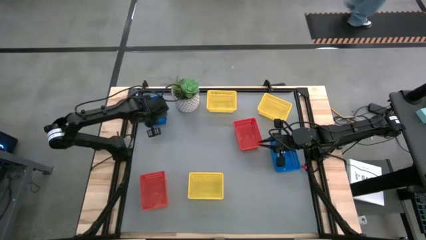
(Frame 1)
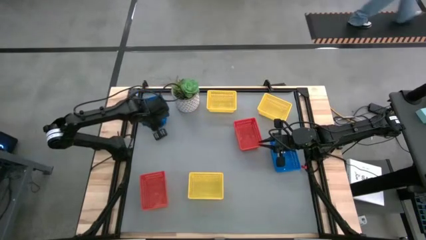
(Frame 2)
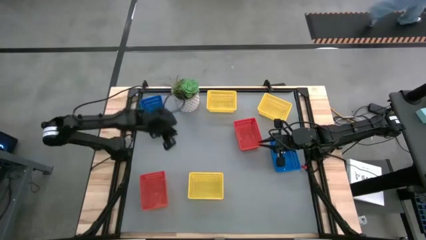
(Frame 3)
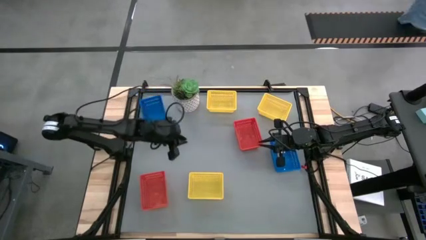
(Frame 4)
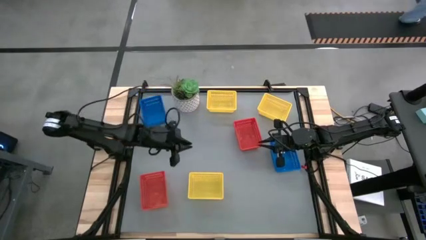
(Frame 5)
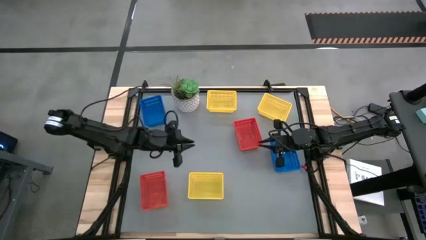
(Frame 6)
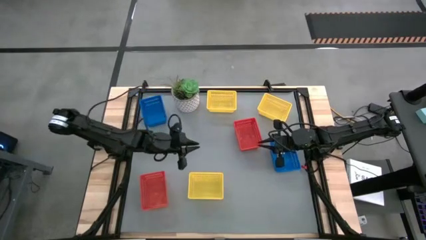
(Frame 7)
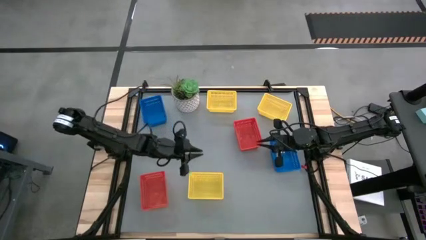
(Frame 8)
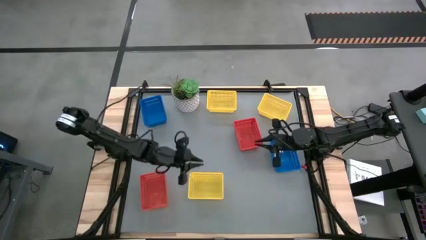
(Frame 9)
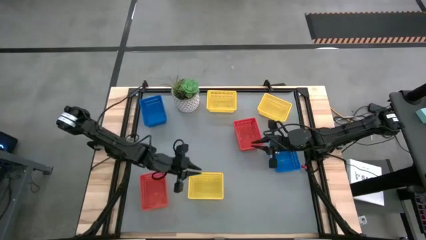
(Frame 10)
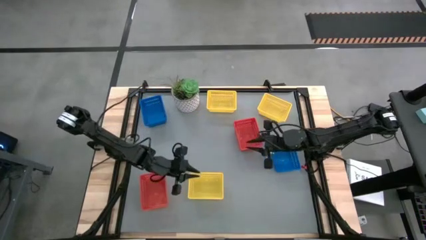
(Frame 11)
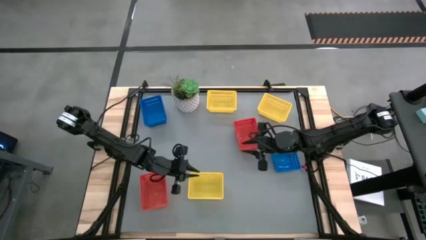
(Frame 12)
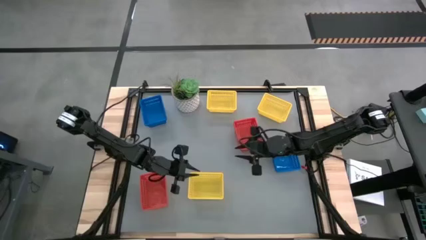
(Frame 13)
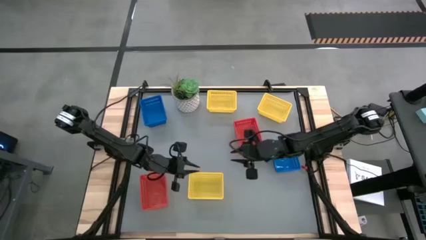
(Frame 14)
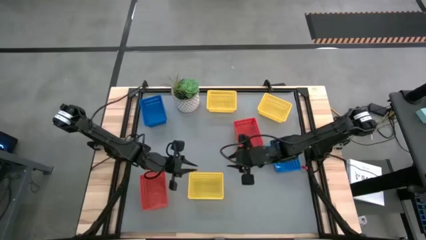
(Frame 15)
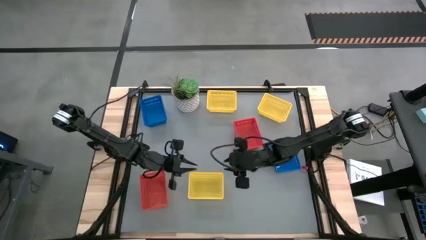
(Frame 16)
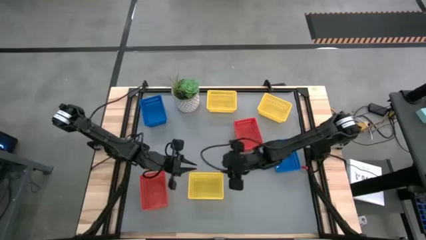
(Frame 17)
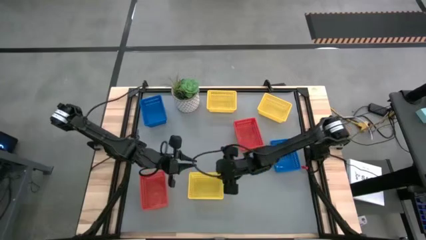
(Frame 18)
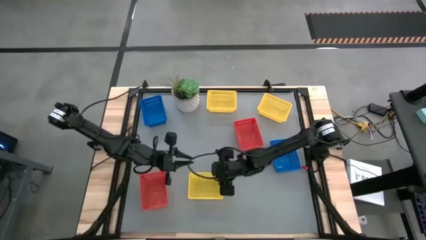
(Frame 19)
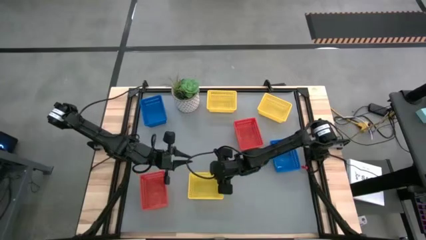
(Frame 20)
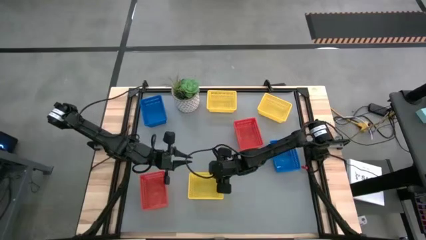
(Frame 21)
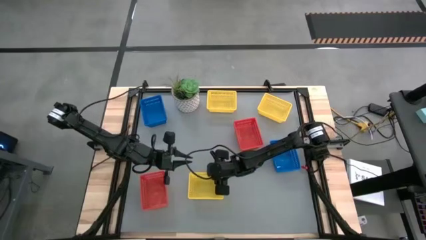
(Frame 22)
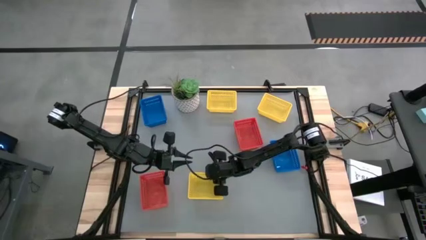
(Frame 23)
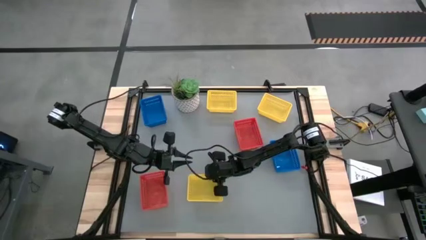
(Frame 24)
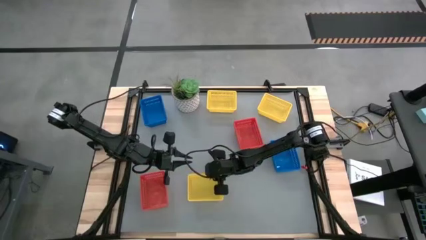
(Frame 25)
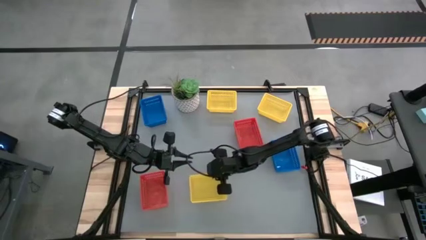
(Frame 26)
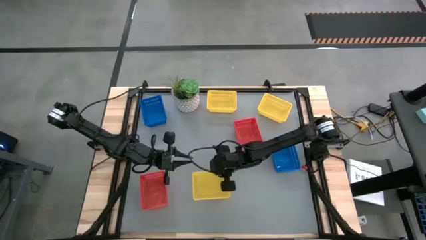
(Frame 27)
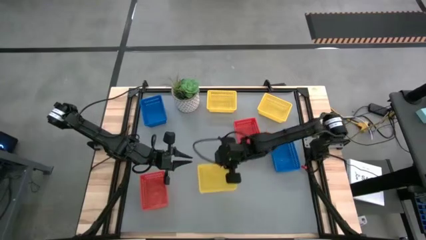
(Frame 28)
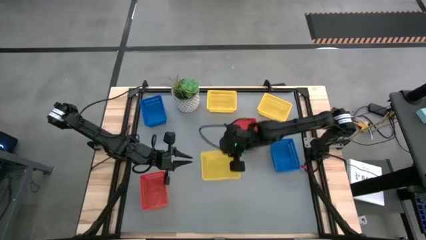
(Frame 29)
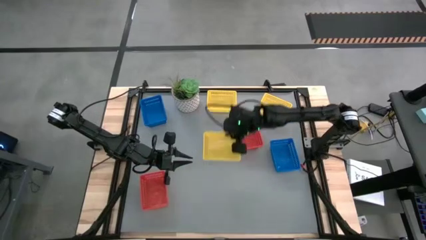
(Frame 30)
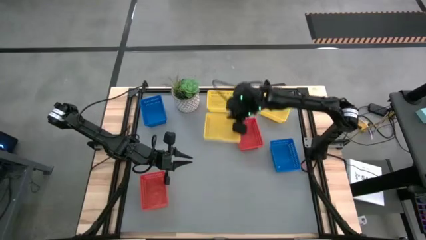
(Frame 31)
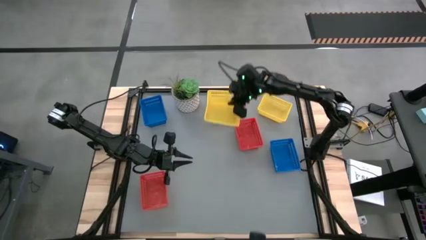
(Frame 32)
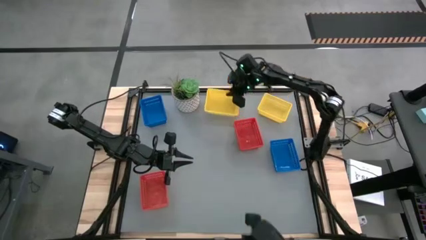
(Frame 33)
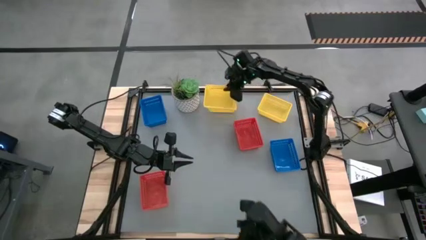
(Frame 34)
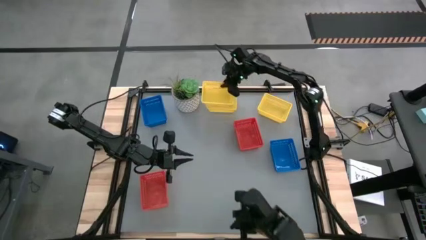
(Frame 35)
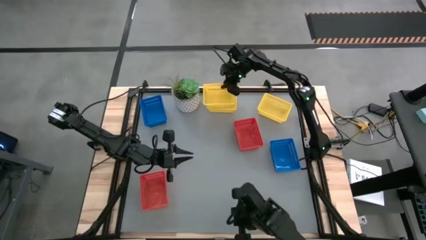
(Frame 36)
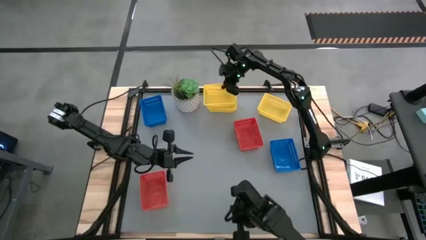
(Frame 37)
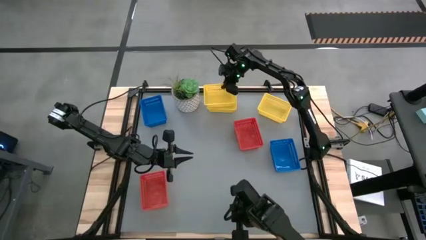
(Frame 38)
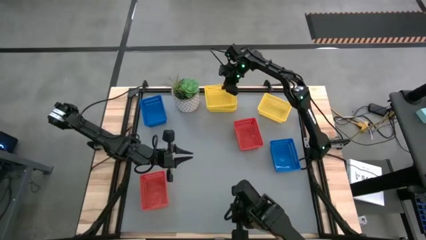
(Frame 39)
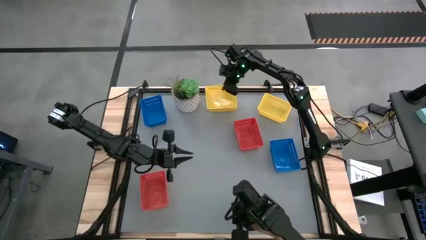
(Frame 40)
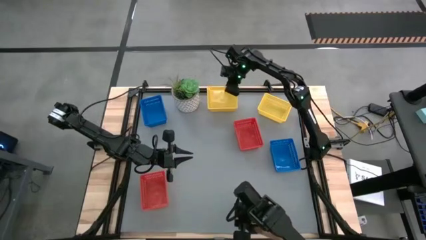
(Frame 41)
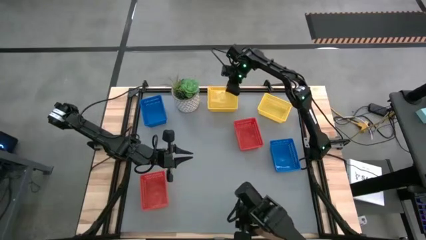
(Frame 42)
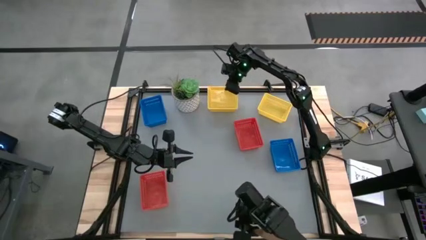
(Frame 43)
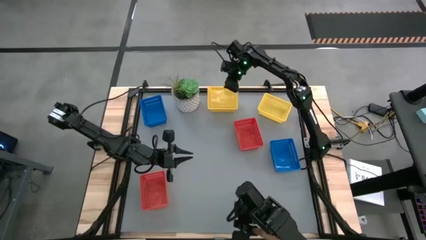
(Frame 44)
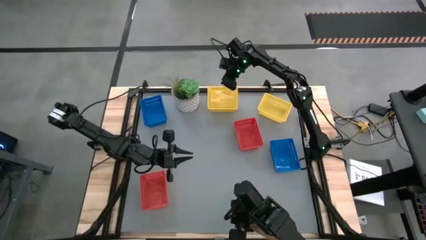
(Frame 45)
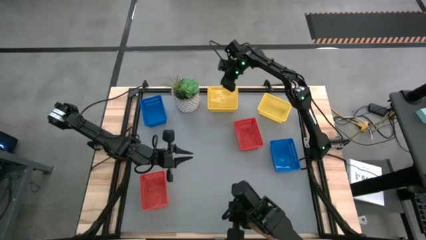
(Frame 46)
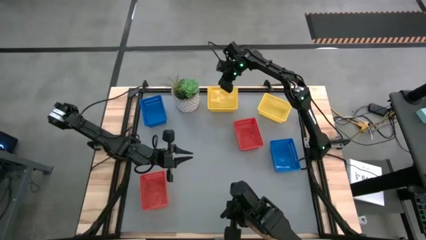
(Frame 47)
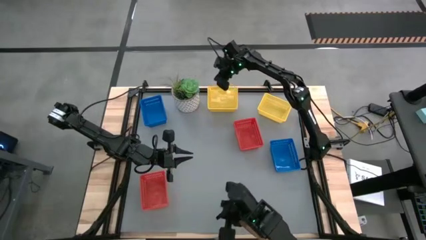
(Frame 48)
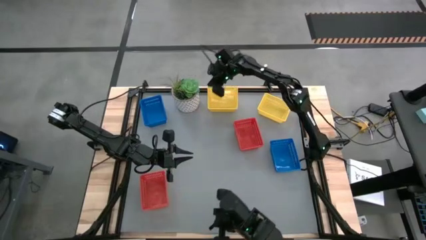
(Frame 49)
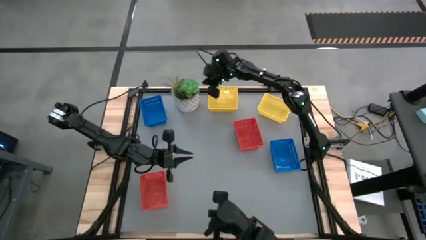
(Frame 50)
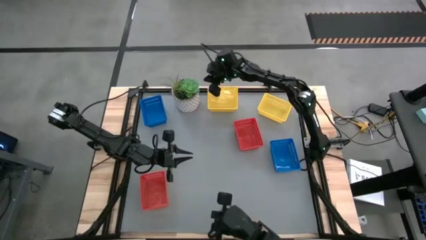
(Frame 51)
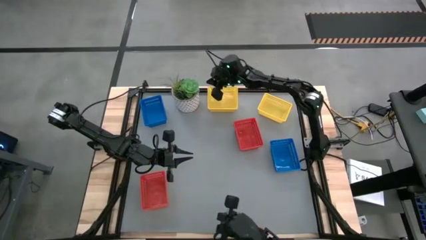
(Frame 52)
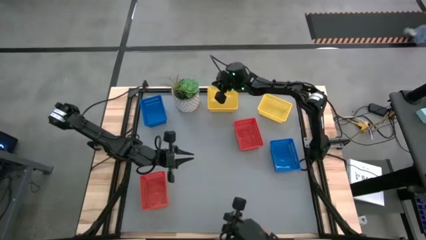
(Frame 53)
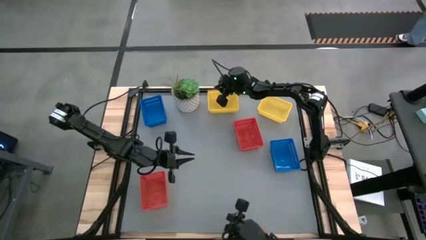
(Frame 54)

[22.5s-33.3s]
Stack the bottom left yellow bin on top of the top left yellow bin

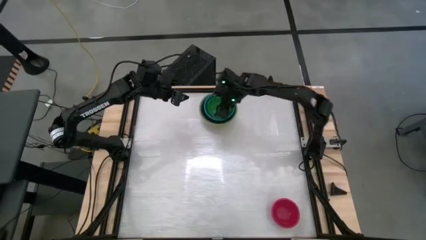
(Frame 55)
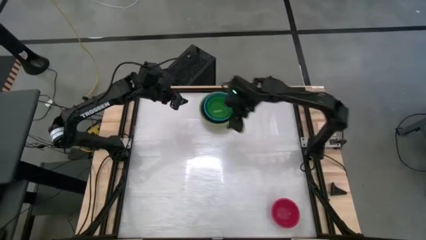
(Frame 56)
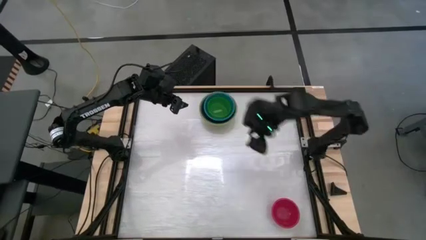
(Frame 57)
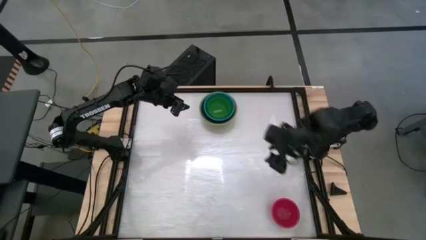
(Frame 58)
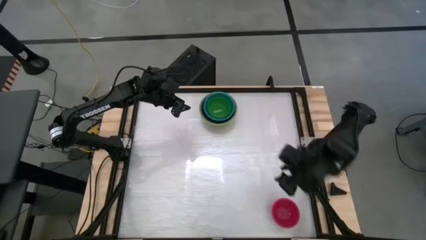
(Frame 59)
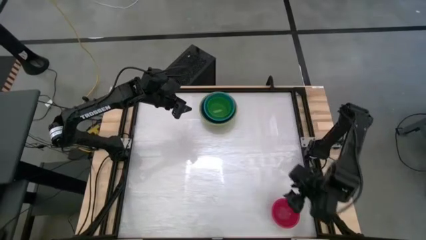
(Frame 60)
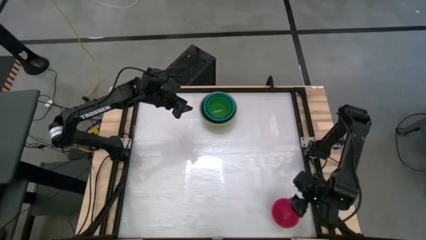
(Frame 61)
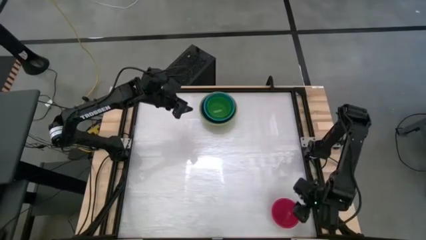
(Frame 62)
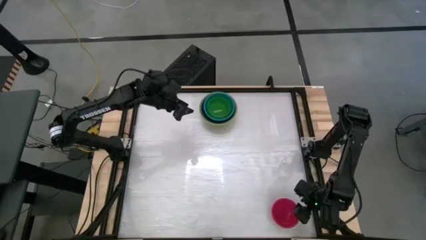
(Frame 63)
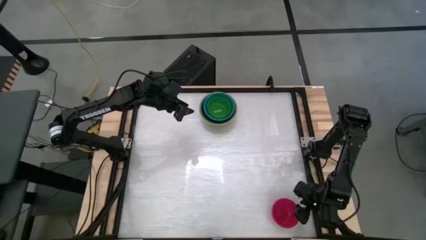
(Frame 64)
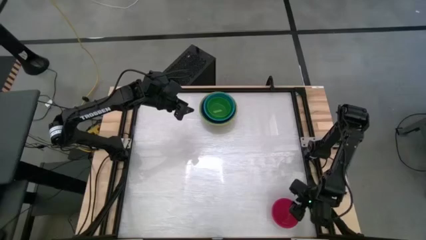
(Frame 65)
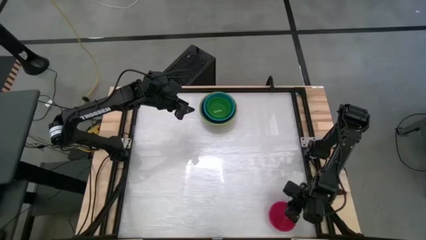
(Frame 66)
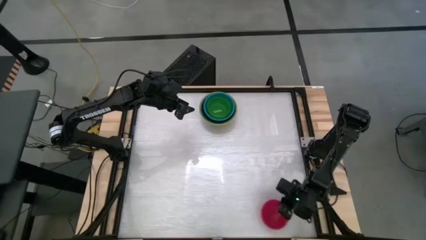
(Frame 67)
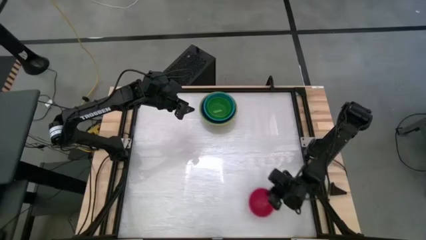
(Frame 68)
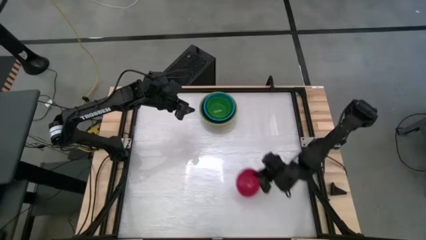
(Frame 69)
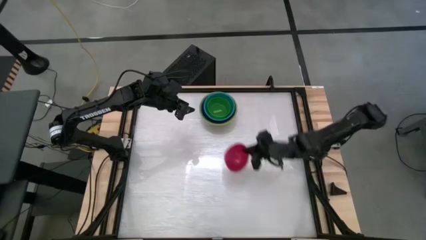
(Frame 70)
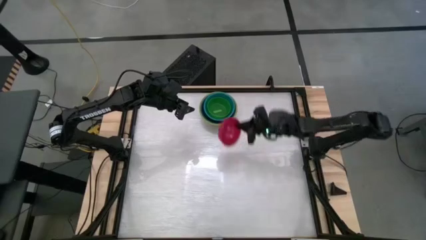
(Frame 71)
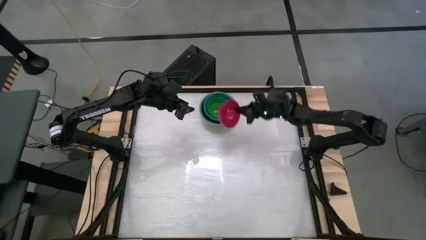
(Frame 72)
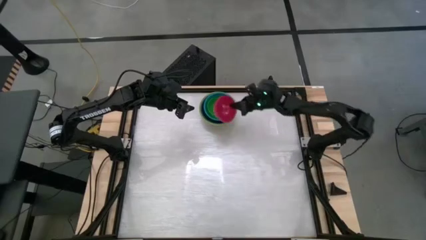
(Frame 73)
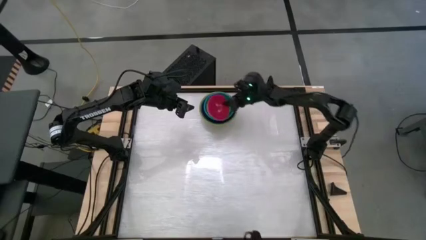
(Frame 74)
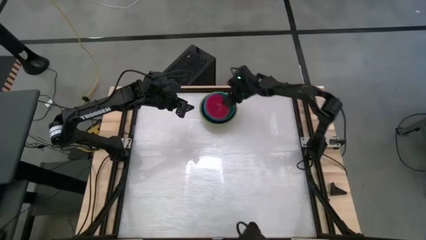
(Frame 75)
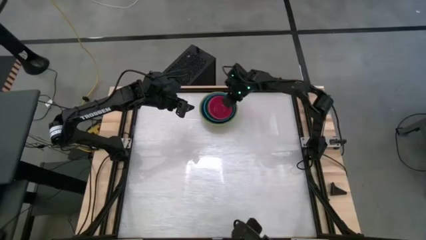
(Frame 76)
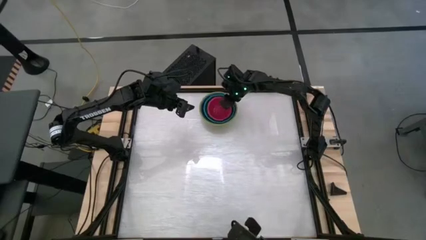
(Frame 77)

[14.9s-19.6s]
Stack the pink bowl on top of the light green bowl
